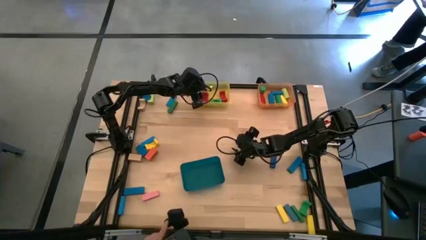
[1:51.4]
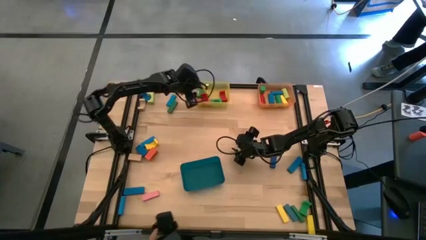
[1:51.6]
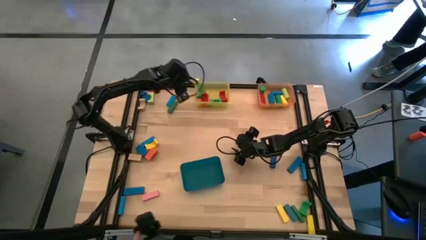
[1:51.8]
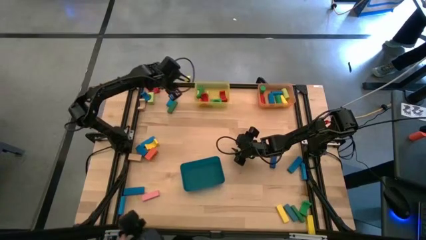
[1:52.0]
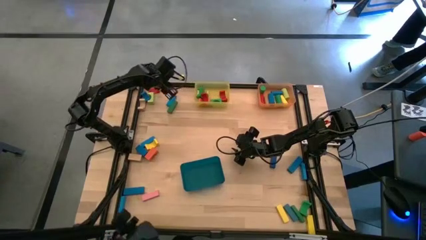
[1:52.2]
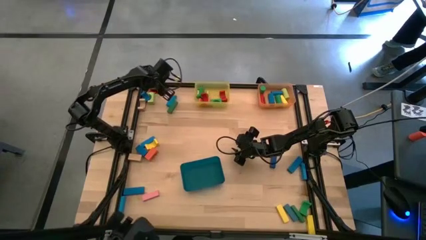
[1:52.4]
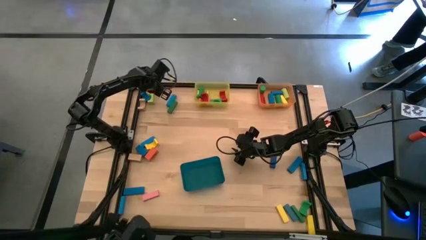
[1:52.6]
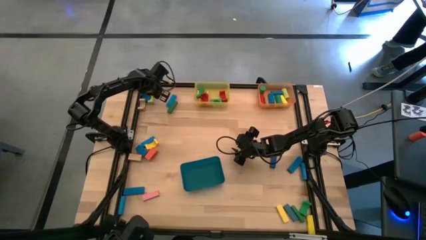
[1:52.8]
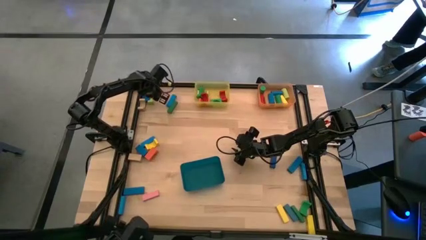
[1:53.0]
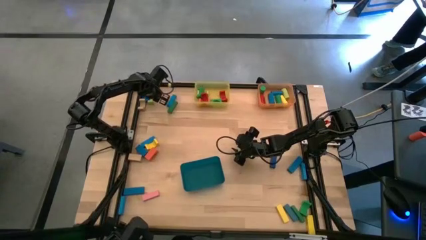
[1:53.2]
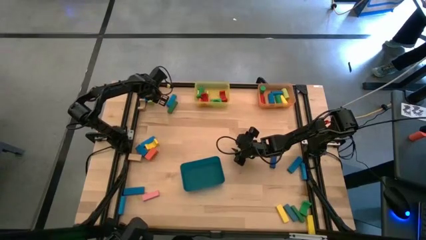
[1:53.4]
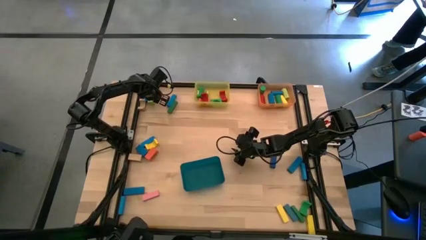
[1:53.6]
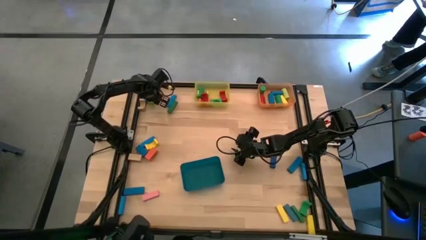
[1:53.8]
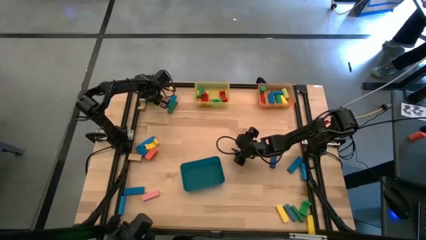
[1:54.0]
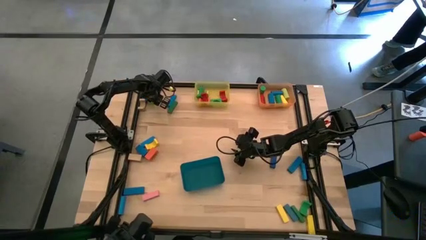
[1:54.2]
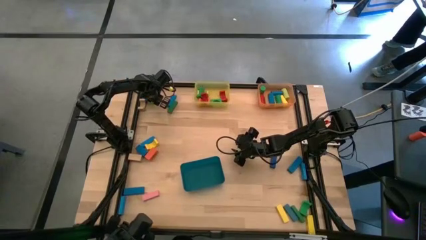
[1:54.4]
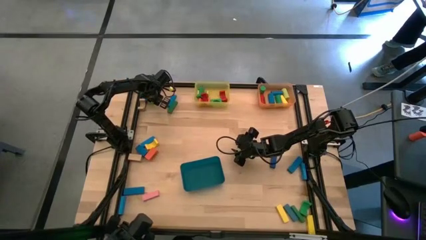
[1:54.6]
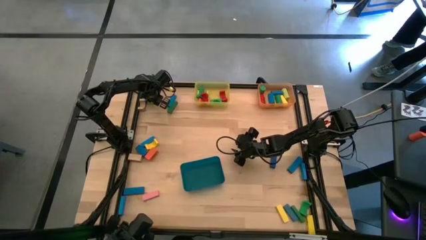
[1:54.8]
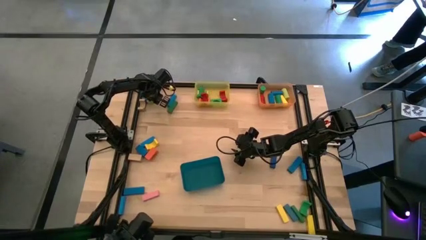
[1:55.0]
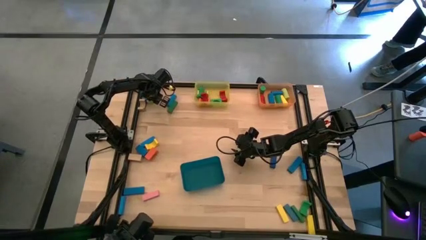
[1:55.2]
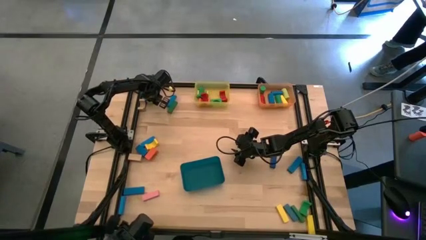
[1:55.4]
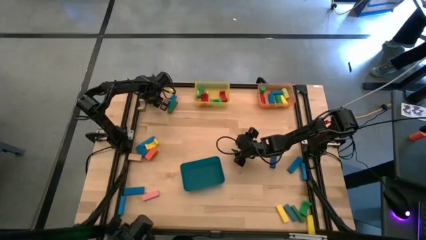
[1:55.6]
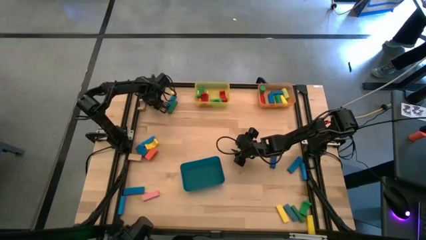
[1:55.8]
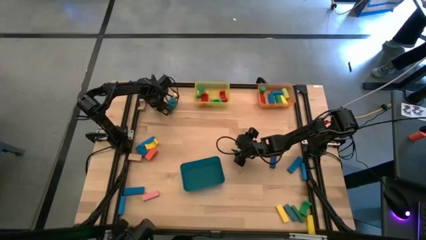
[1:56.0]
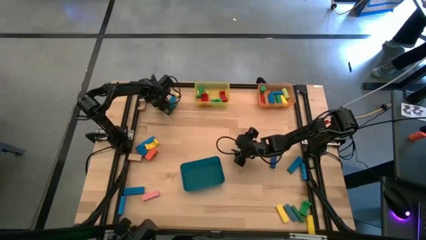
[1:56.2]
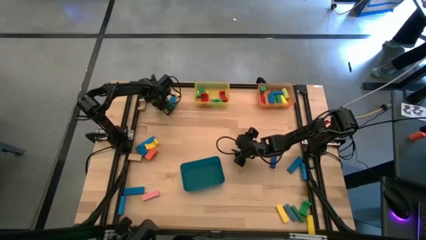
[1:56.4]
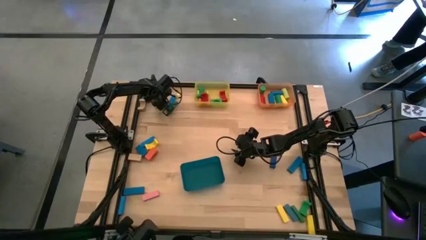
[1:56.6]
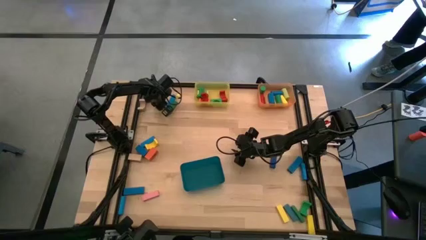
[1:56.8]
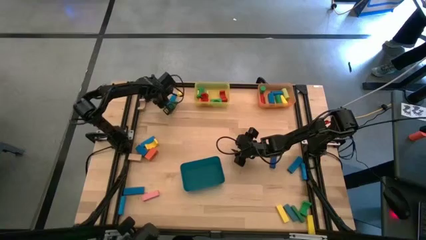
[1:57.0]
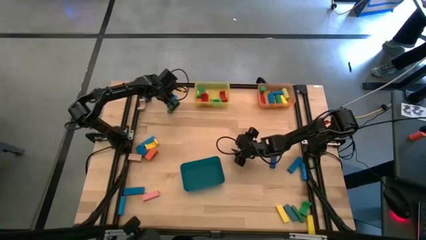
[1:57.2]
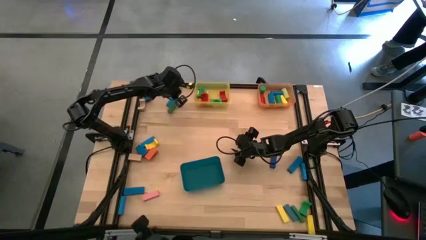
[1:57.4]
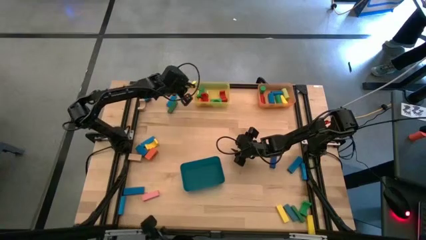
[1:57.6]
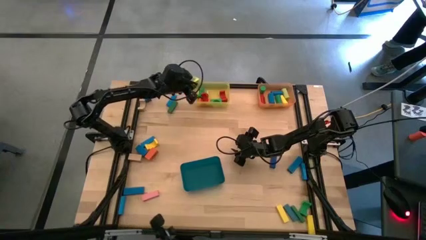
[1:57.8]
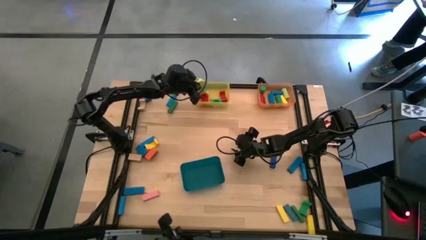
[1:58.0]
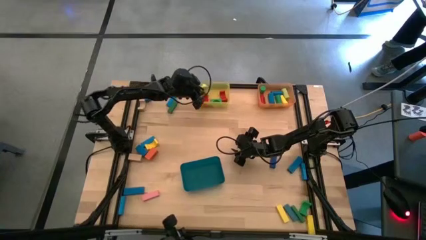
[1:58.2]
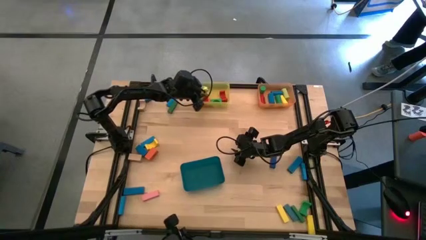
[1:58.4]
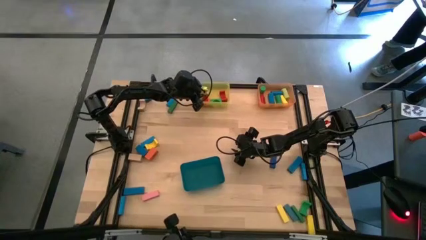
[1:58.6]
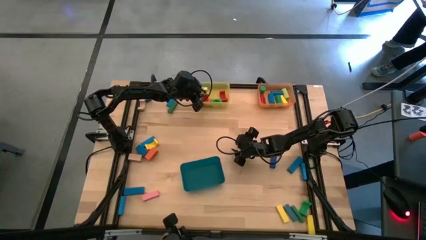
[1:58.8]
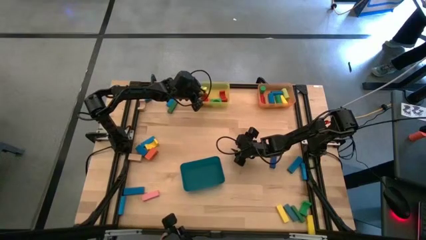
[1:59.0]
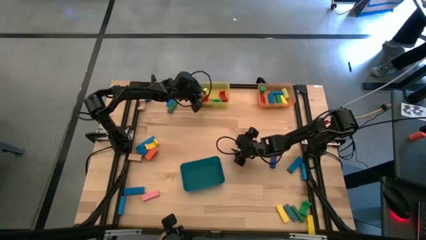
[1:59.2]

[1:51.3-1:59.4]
Task: Sort blocks by size
Put the light green arch block into the yellow bin

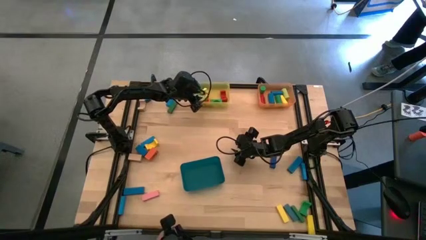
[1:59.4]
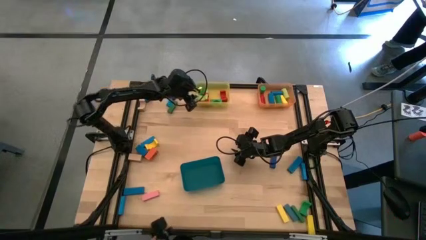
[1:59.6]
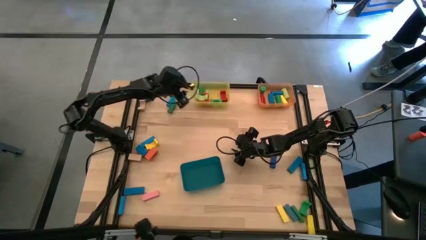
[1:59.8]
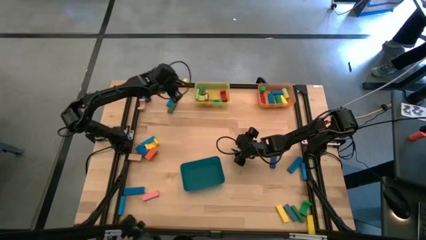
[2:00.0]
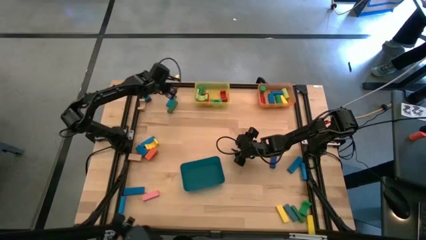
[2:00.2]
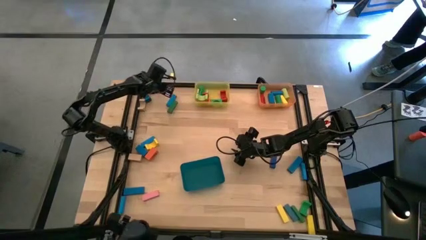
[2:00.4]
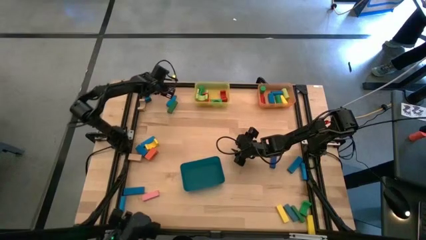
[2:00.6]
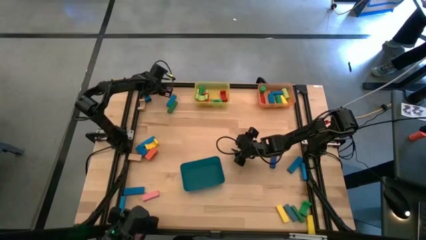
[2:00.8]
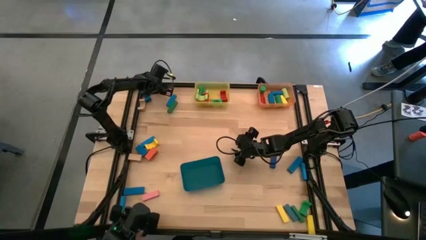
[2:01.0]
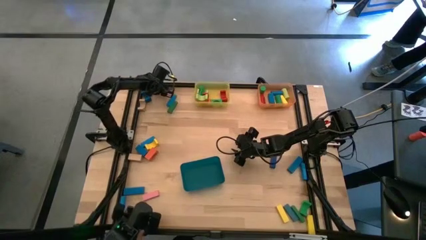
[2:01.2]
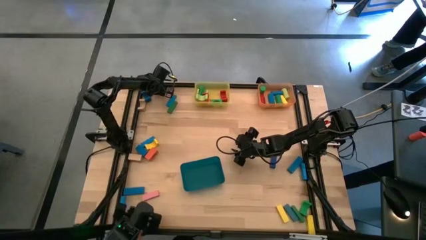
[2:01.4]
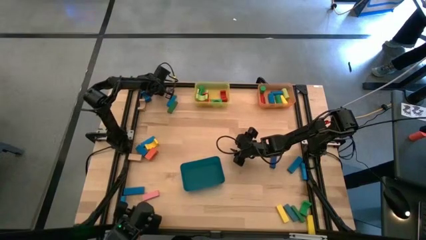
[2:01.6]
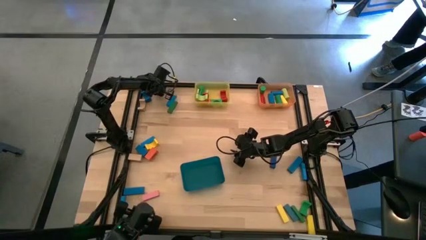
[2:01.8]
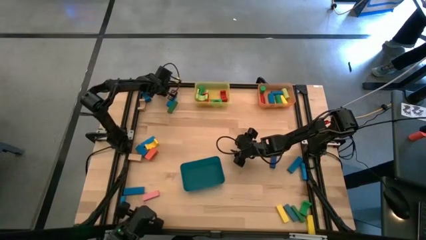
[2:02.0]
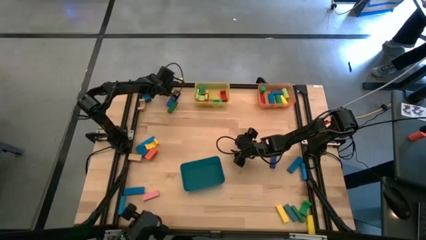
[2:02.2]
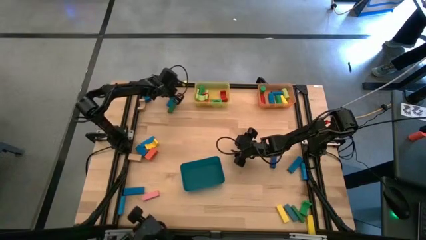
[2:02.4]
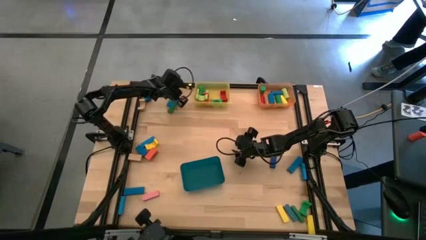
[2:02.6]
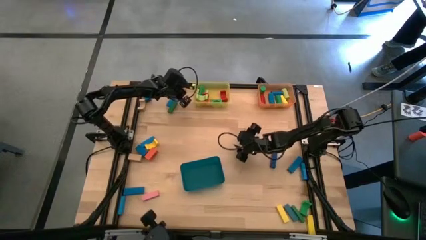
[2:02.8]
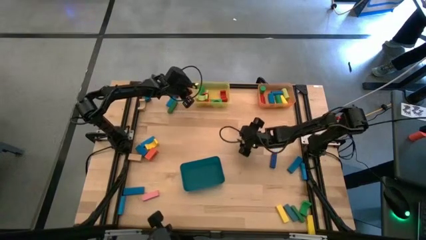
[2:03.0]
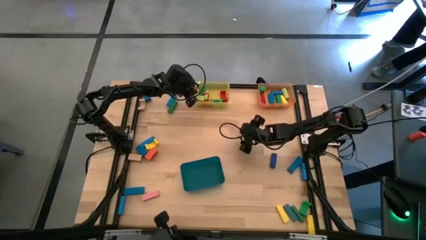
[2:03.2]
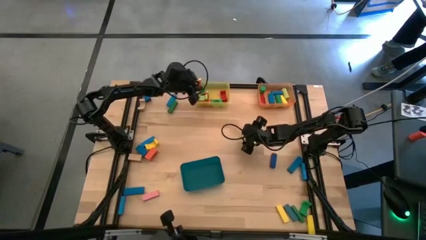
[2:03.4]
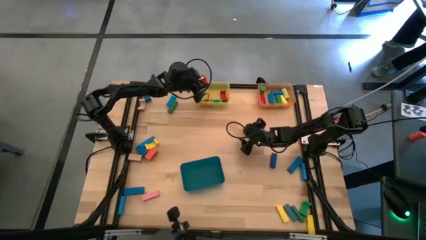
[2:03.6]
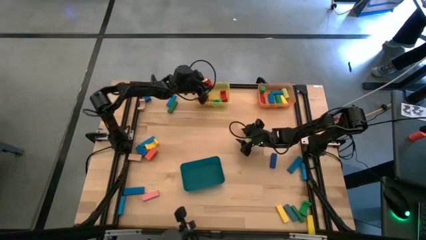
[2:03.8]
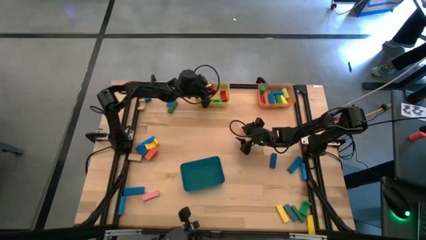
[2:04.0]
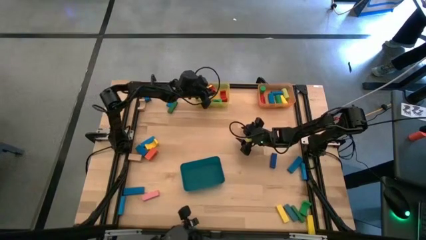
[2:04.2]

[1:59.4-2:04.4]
Put the red arch block into the yellow bin

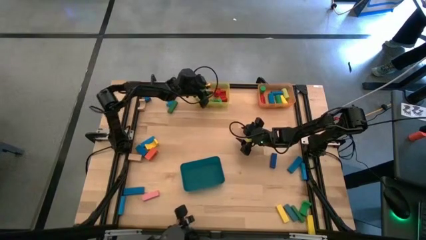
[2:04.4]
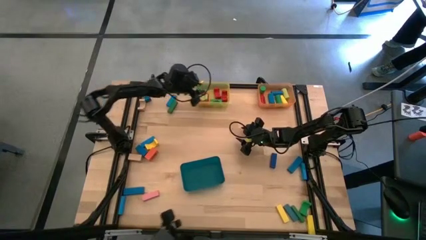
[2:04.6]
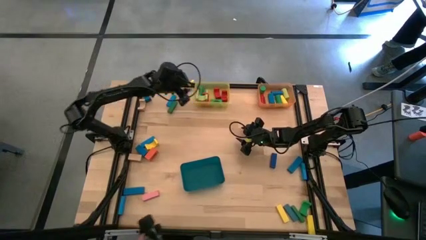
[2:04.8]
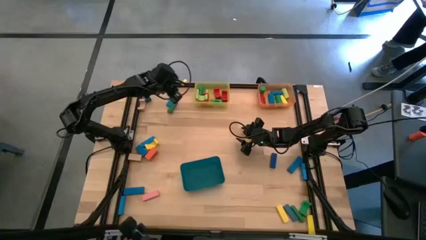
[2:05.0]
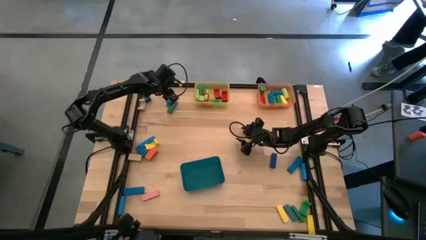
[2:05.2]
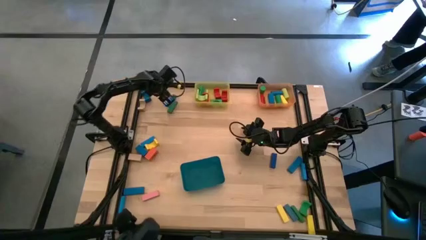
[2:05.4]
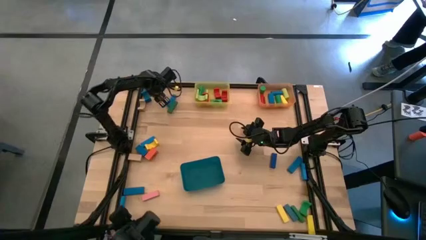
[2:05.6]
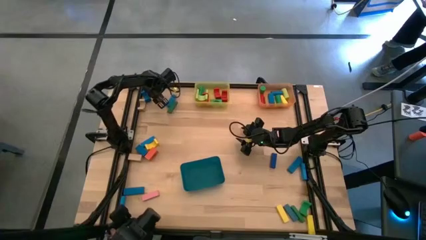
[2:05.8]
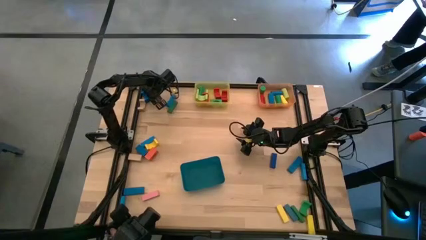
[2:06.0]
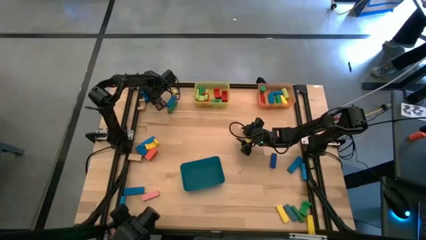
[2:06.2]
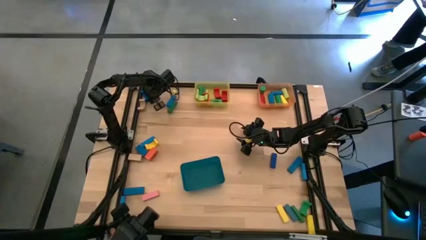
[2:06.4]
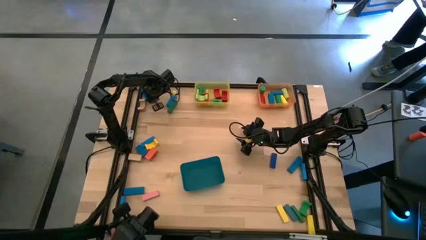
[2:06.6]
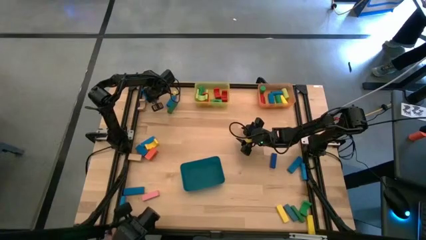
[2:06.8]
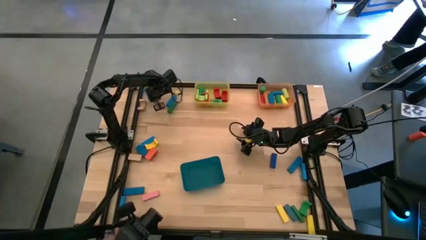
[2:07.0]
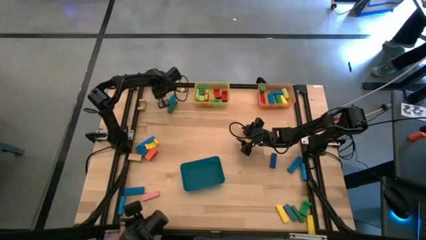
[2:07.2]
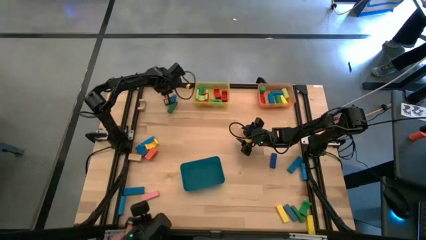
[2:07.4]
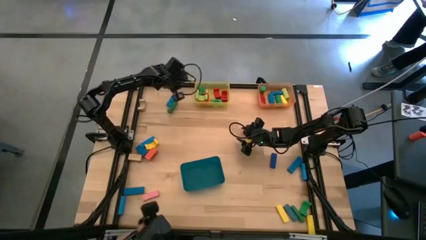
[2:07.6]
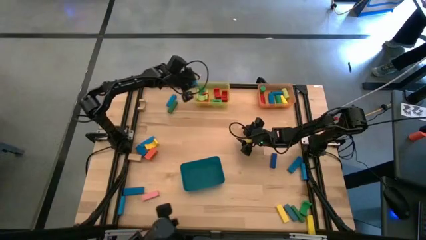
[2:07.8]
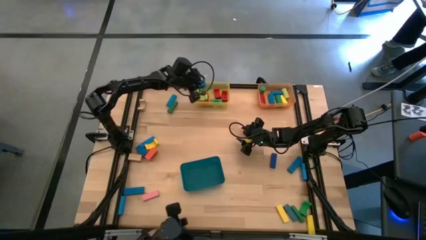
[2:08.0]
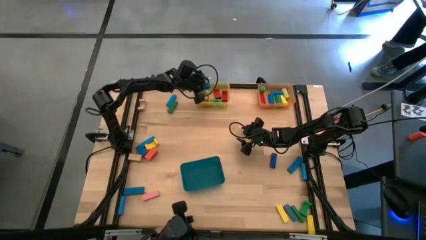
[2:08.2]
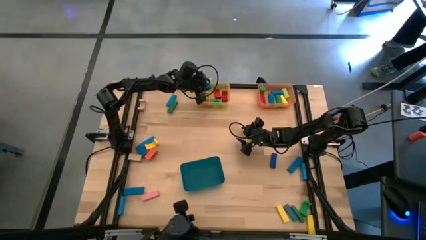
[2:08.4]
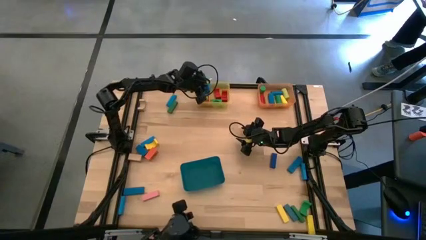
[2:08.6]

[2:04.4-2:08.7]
Put the blue arch block into the yellow bin
